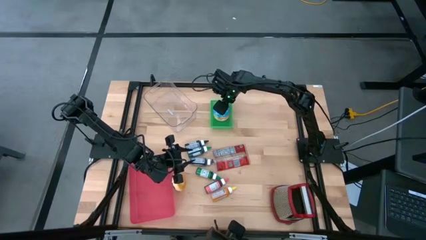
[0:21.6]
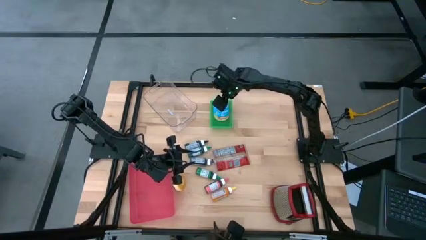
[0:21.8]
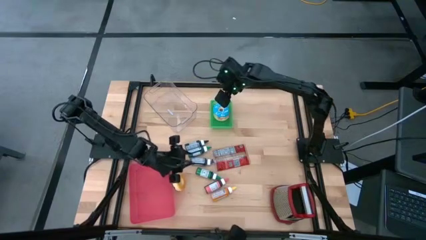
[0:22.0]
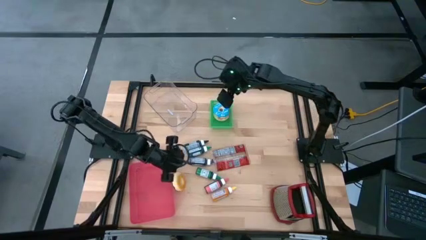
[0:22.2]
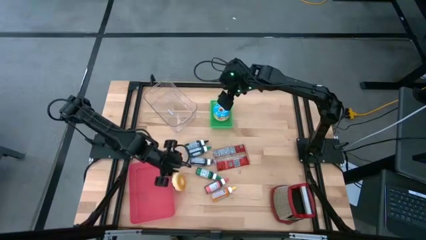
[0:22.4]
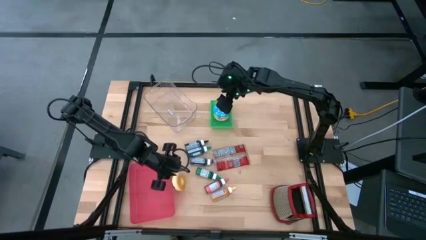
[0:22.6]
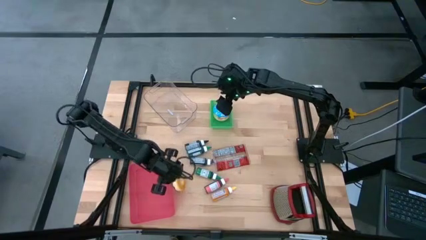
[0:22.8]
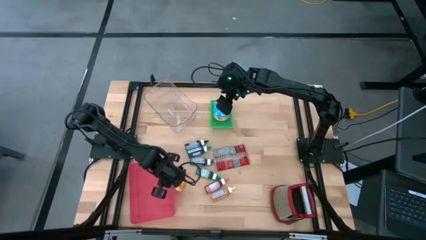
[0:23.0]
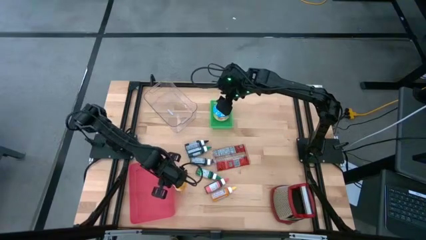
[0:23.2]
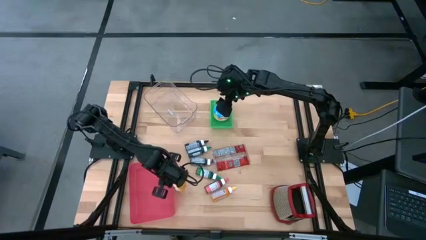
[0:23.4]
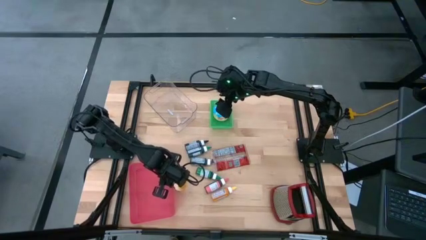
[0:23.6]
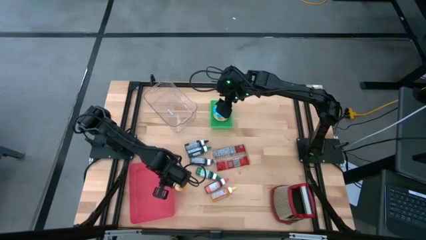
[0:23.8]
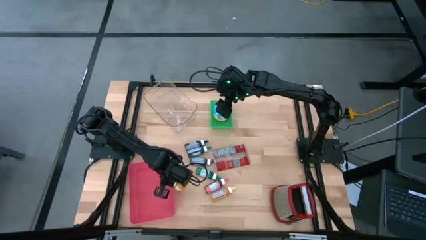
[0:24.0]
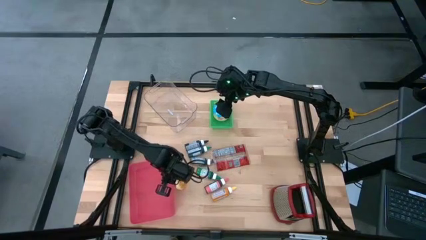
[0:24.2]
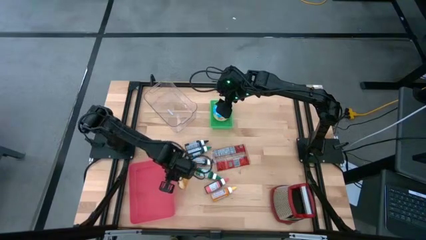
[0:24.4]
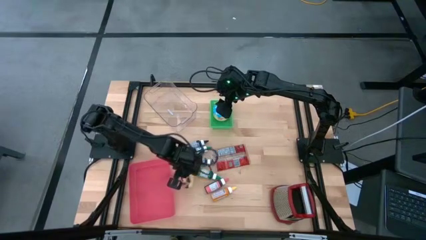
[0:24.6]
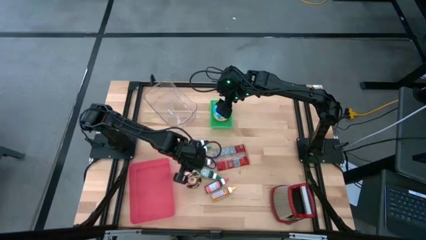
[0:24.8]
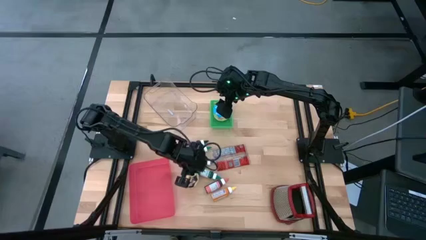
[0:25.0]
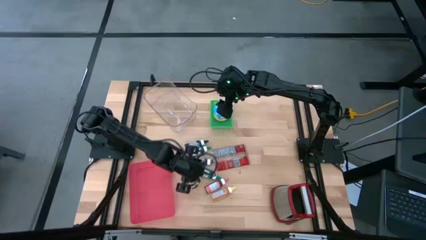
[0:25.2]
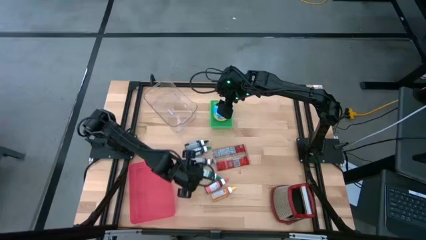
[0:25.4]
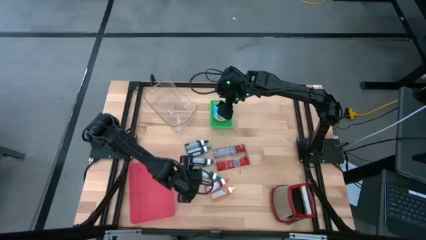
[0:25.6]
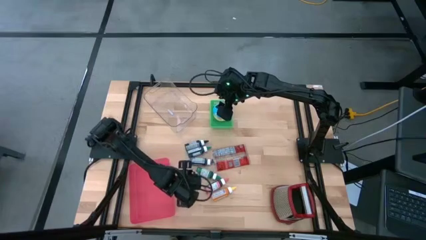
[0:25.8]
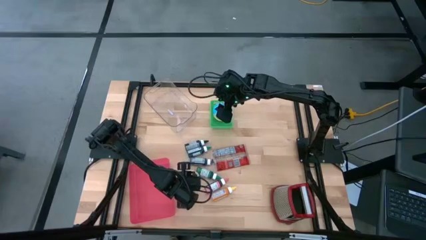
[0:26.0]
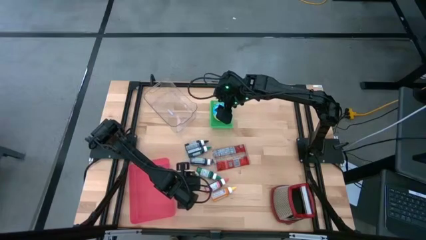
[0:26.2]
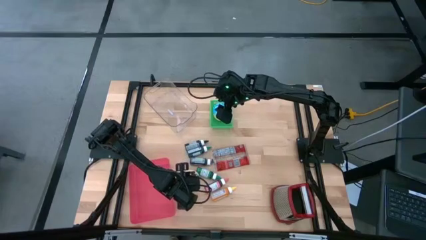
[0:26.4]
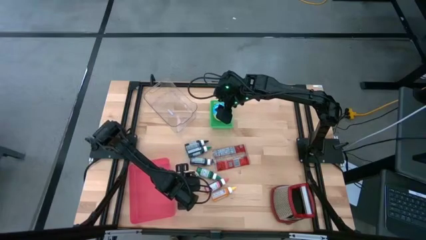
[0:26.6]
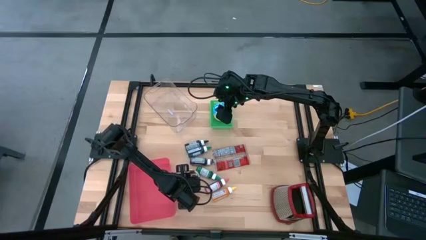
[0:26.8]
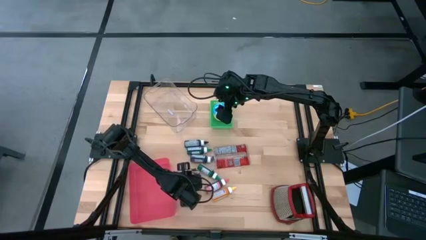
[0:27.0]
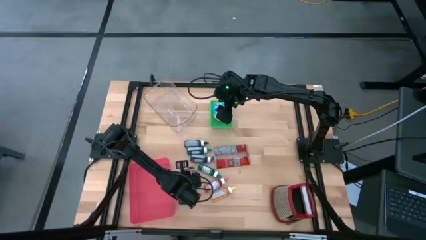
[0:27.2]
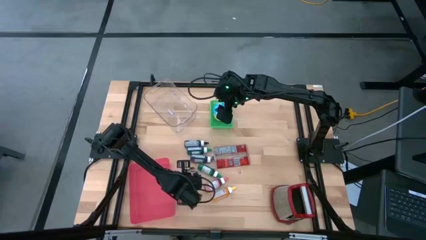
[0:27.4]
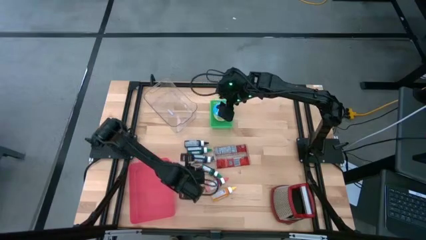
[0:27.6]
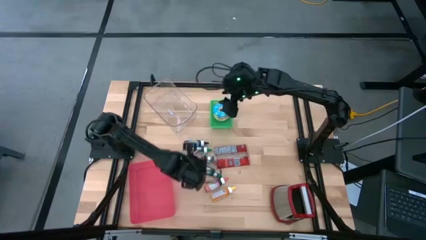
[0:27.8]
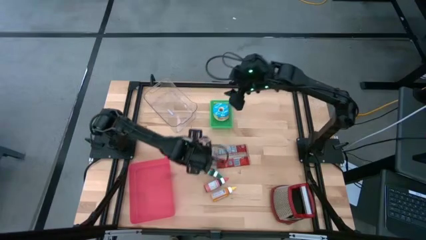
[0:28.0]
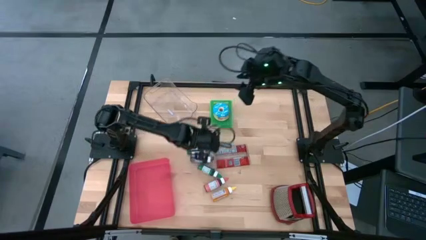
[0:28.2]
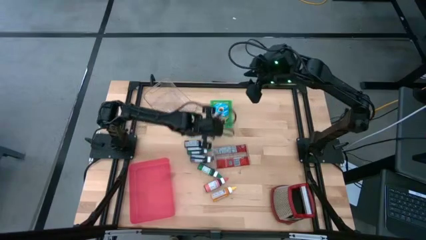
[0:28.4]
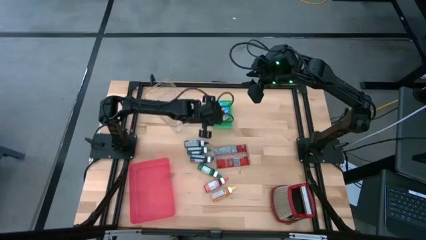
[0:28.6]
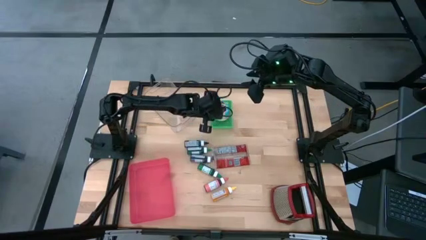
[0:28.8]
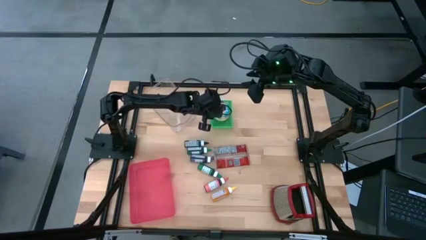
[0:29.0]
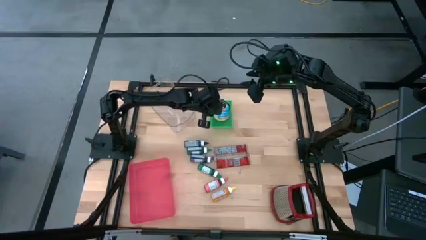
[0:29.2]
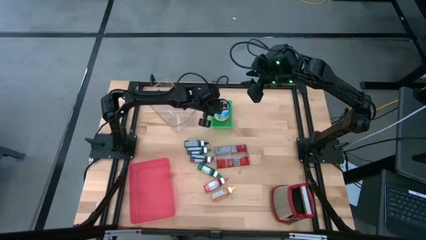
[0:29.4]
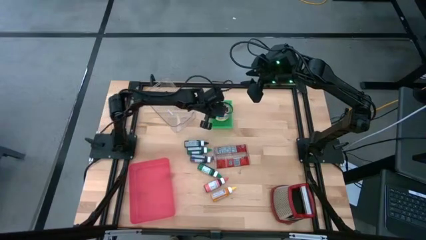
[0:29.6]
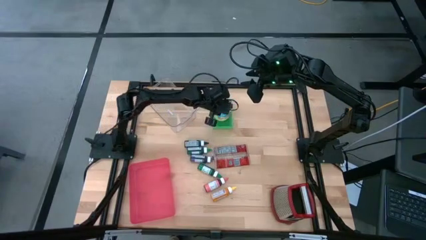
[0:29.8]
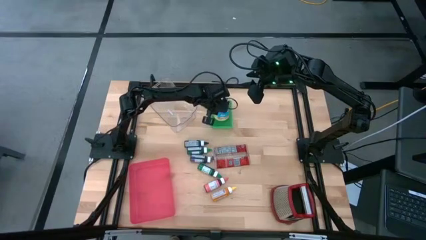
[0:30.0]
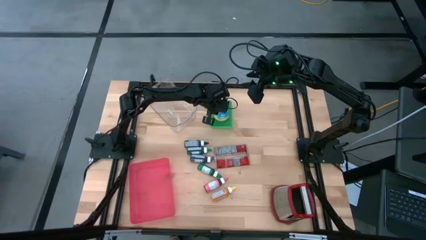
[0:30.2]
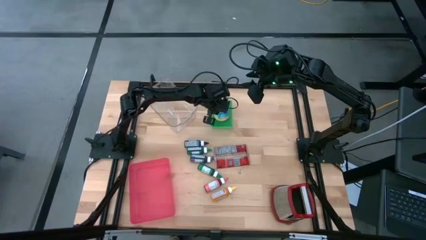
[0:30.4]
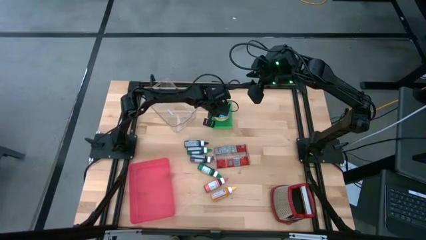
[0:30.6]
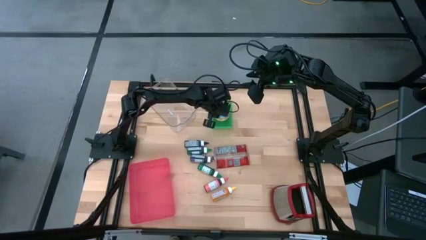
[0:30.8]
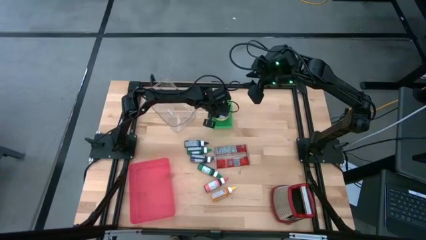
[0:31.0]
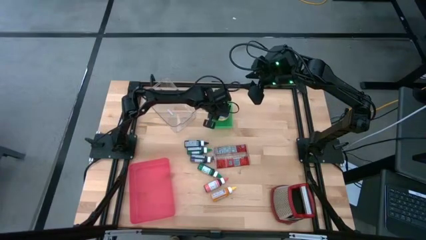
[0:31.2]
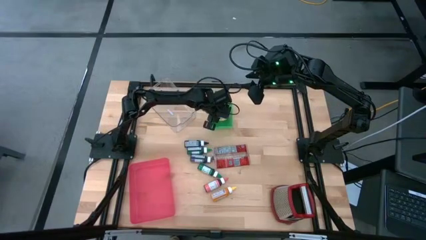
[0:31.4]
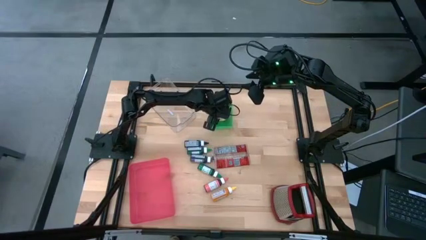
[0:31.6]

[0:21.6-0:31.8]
Put the black donut into the green basket
